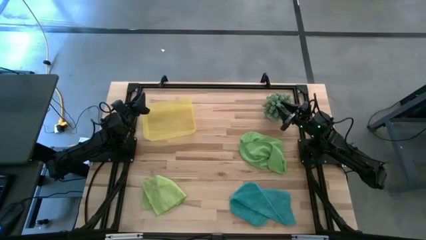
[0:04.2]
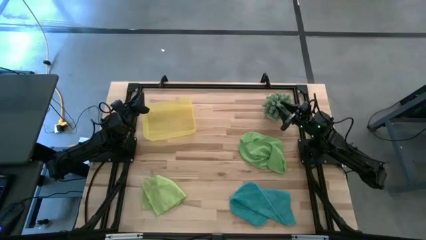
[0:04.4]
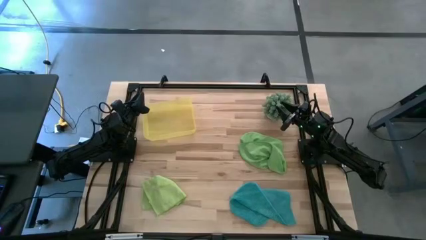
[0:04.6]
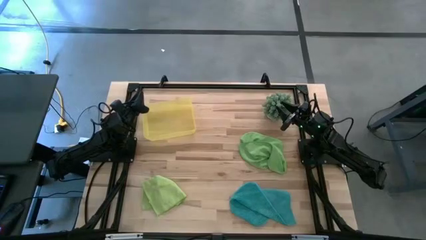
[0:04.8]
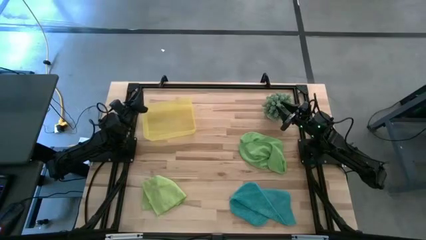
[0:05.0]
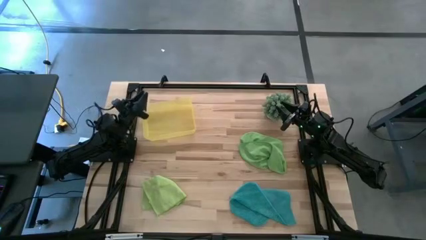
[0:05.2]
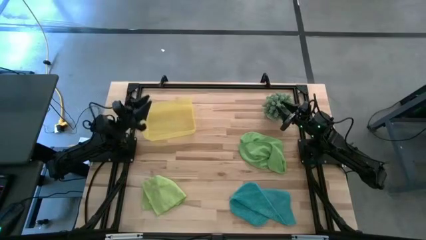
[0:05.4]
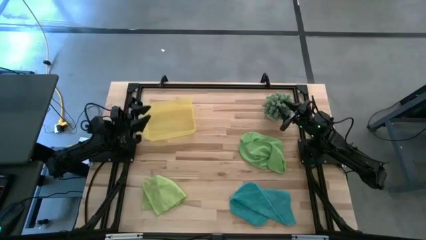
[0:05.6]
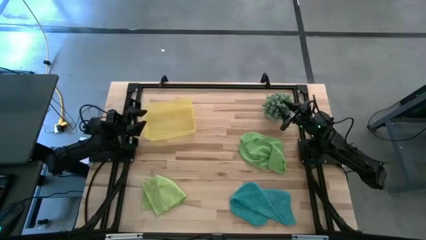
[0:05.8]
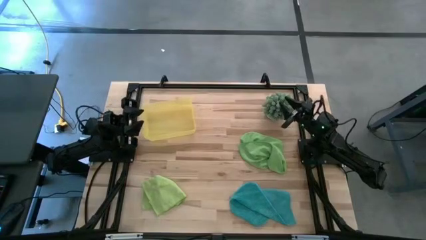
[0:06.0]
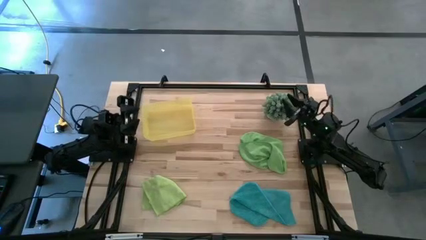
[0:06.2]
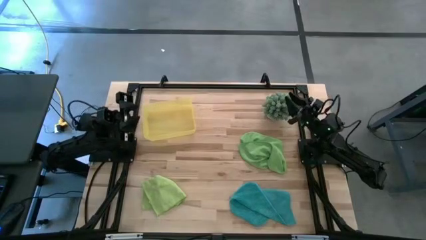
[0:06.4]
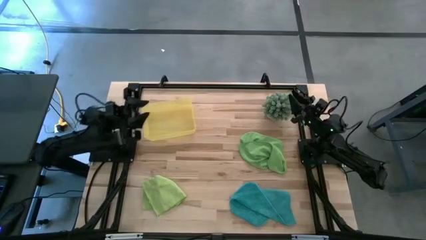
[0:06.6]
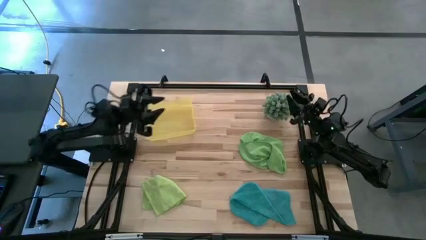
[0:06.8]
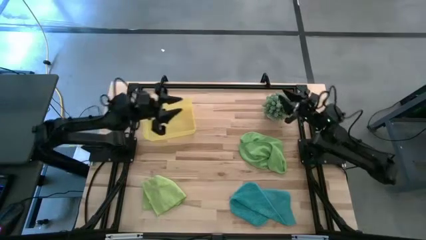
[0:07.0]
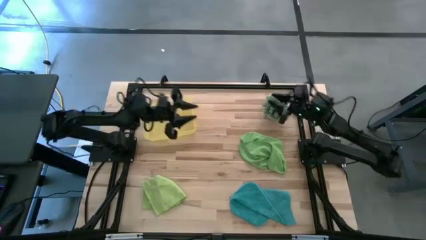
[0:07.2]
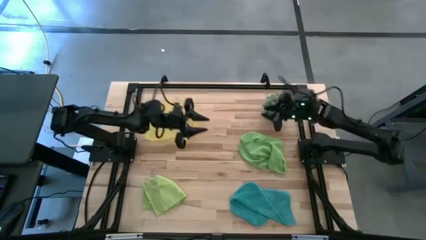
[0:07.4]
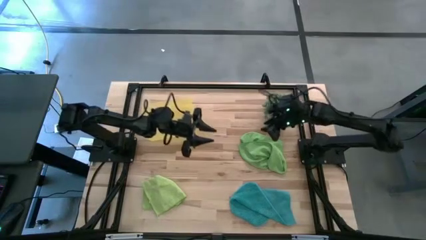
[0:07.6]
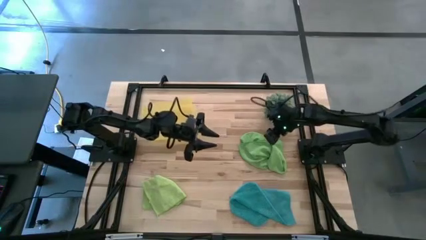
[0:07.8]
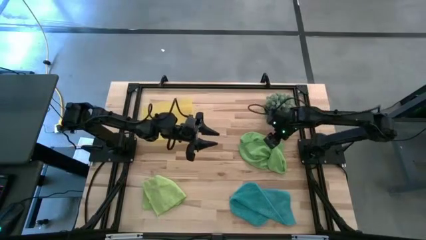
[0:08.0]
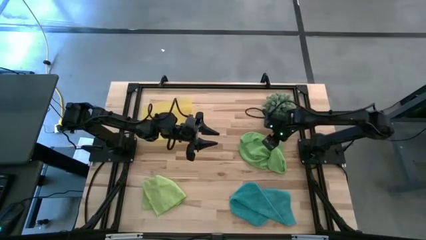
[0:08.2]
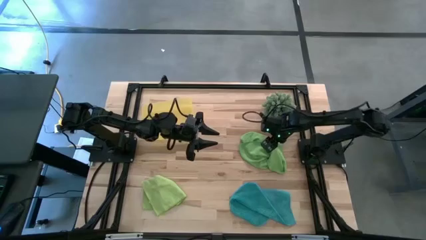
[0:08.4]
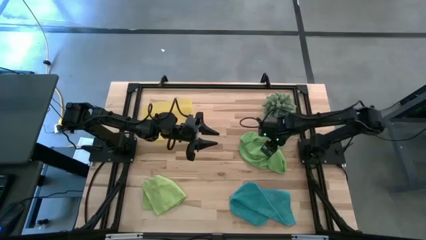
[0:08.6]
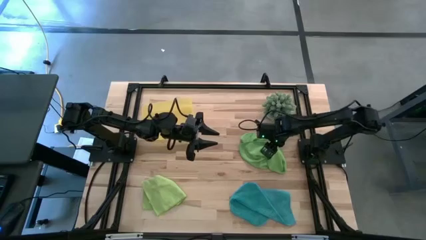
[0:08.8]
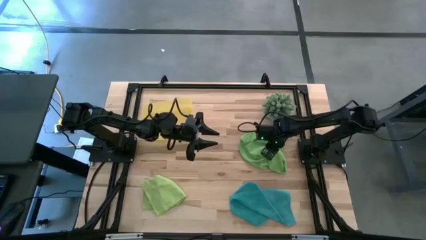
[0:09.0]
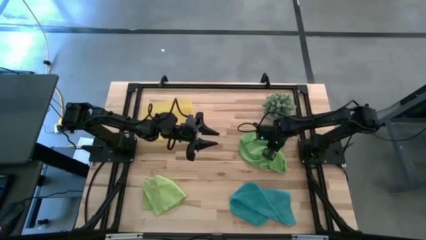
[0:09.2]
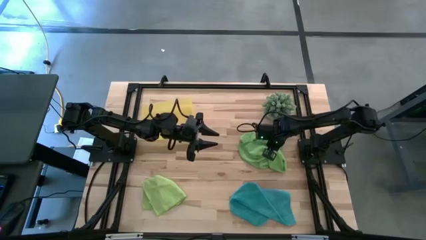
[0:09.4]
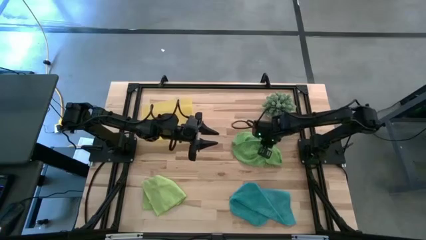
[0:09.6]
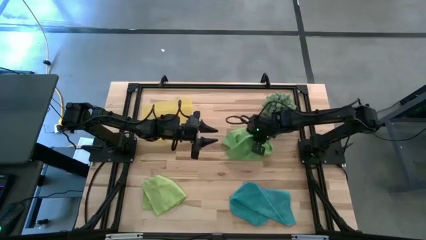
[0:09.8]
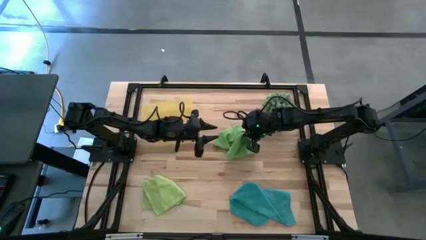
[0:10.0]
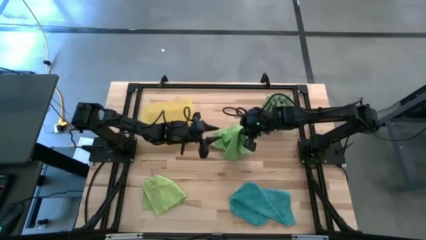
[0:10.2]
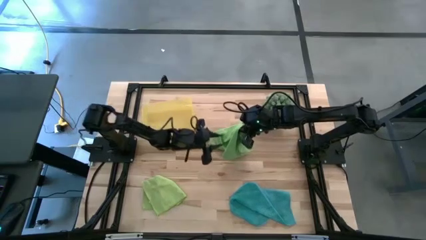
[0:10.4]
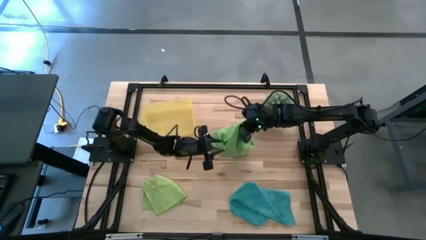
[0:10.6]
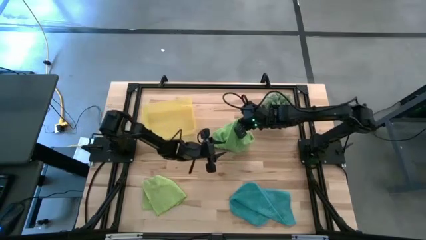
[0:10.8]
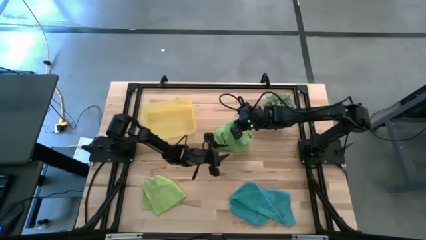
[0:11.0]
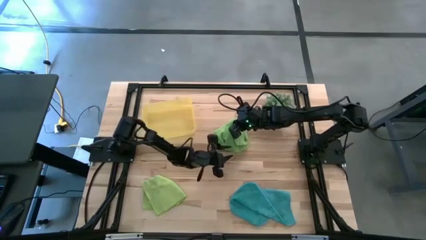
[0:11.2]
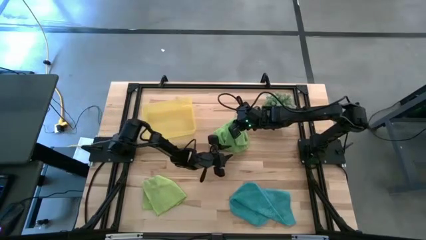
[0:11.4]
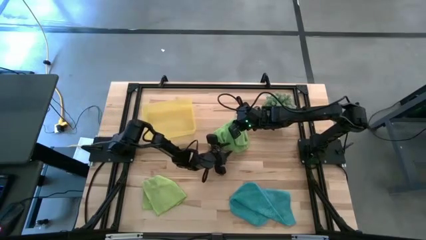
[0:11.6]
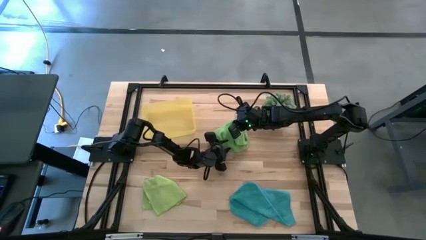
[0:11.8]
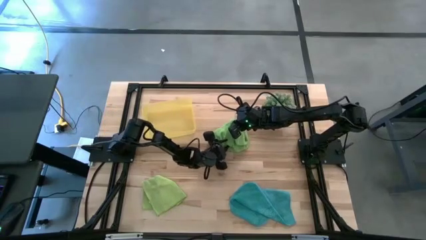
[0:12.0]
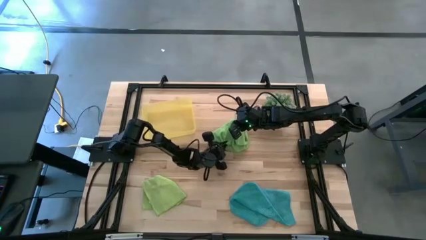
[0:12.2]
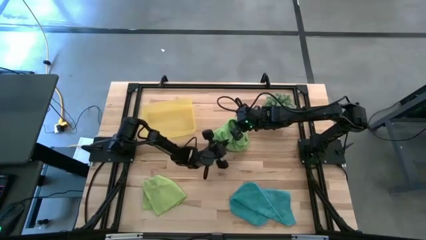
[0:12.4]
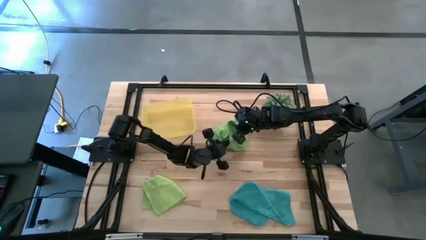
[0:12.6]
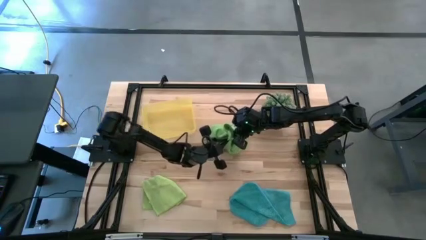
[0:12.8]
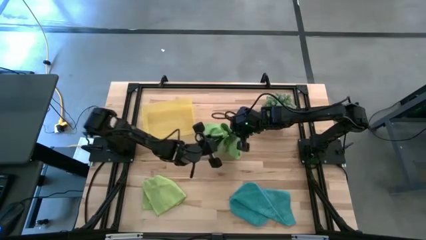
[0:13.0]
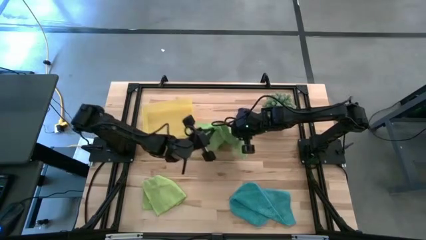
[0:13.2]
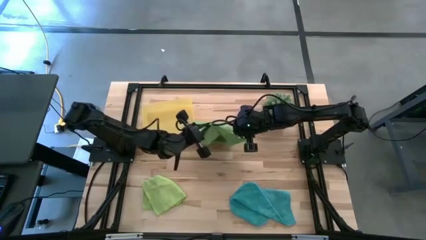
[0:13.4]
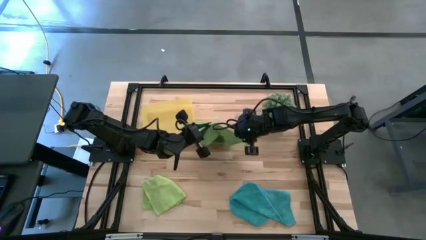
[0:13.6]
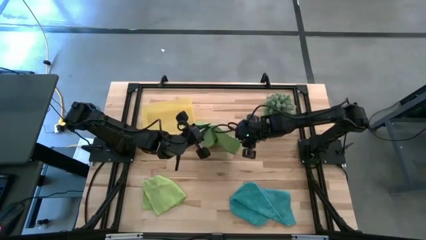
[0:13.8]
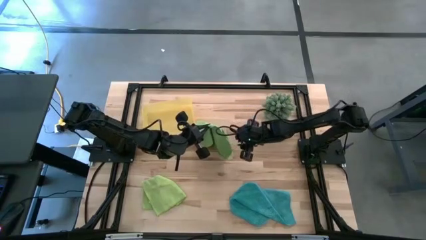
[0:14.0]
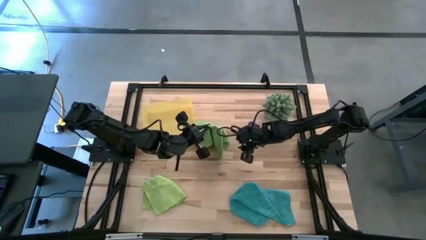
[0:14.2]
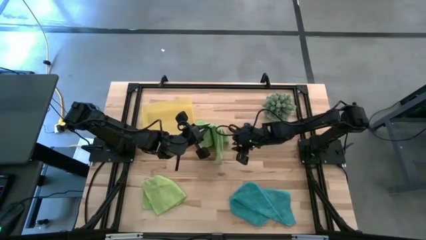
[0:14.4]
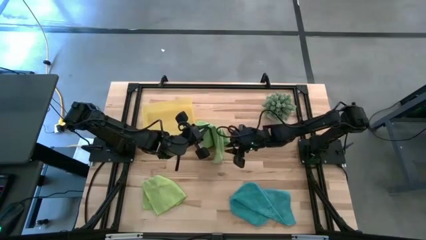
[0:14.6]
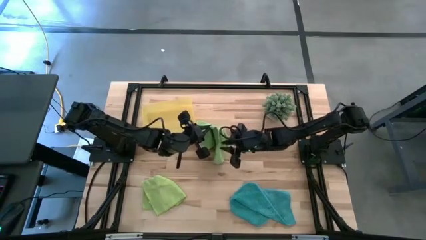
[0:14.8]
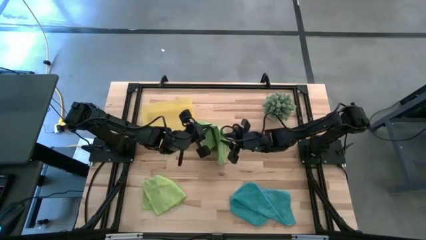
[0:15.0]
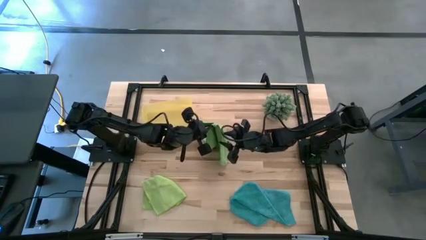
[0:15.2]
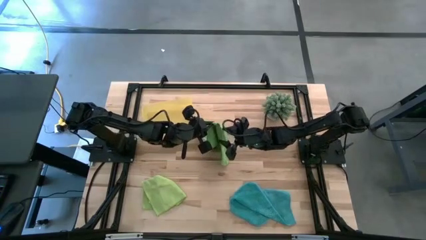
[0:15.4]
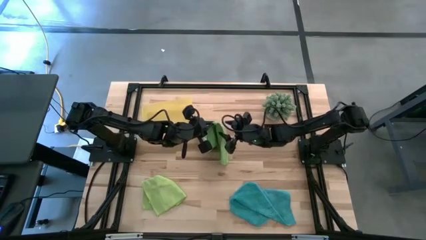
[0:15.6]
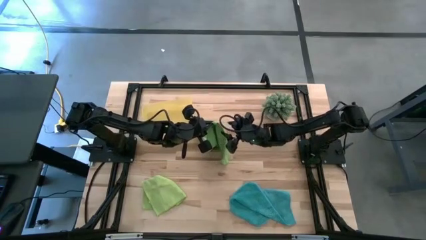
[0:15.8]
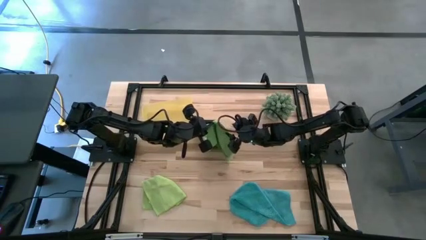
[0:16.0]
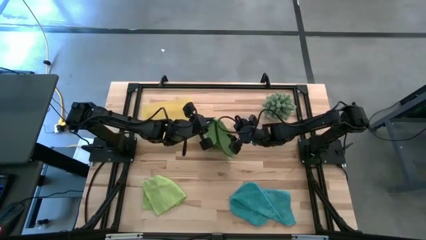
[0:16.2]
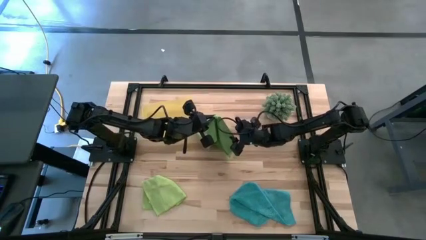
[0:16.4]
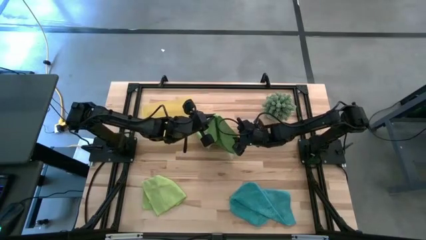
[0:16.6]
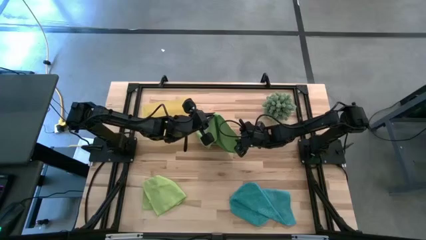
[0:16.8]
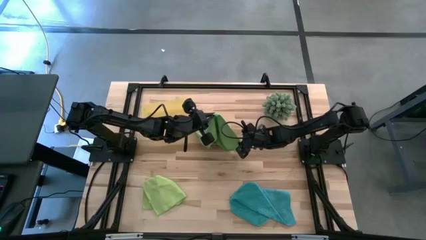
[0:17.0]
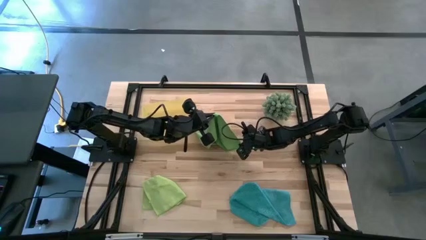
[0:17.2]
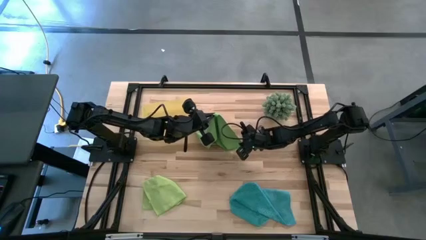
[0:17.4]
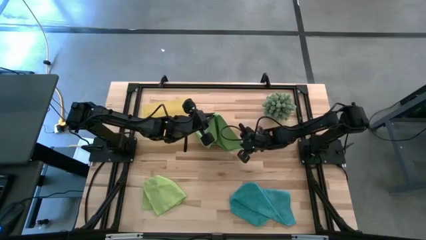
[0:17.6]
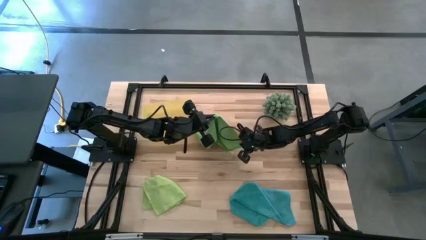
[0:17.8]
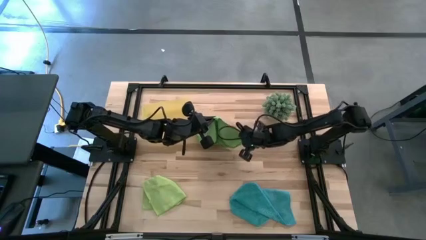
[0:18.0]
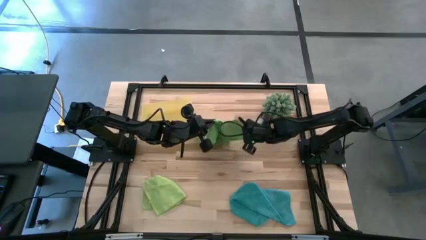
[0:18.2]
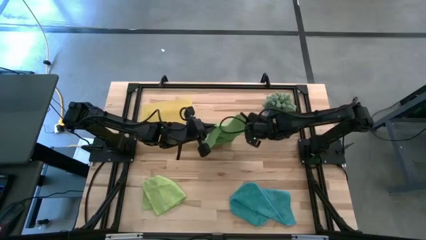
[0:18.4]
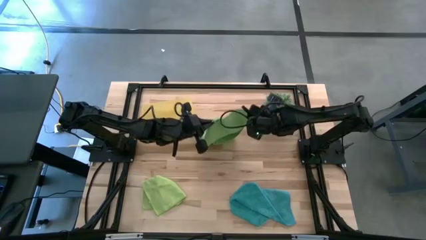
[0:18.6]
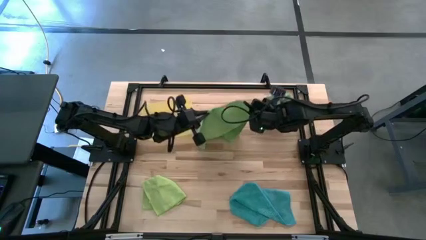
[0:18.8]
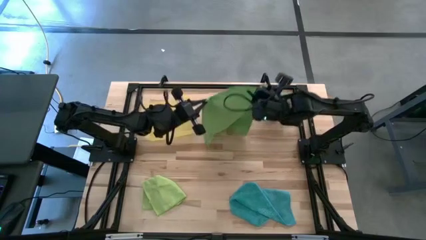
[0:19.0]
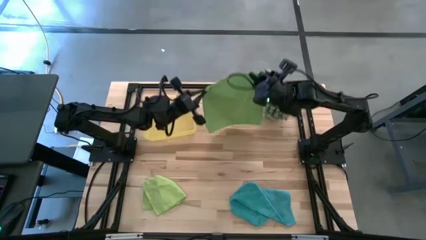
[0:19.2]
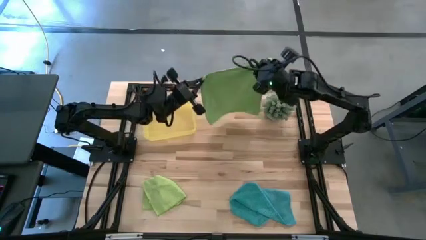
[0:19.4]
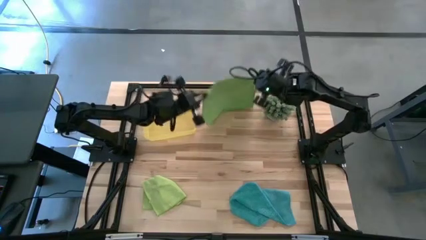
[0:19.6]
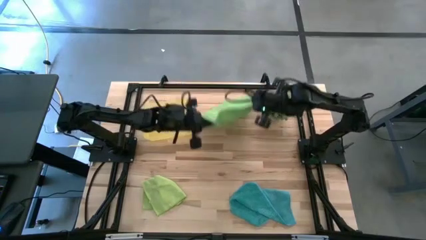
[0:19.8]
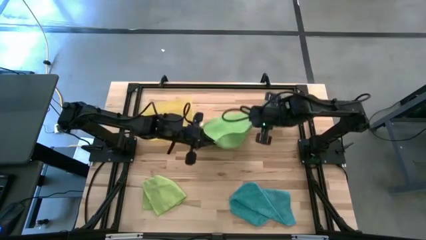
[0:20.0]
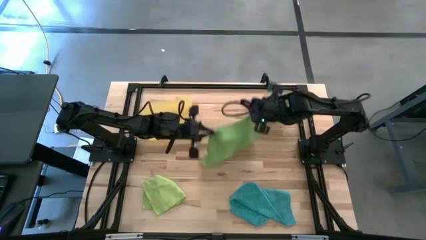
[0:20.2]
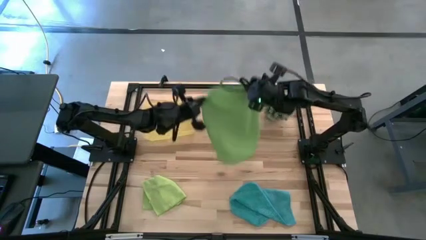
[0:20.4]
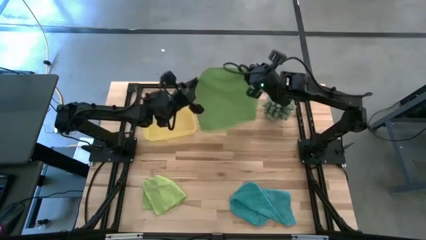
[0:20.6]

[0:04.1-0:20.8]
Task: Roll microfiber towels into tight, uniform cylinder then place into a basket
Fold the green microfiber towel
